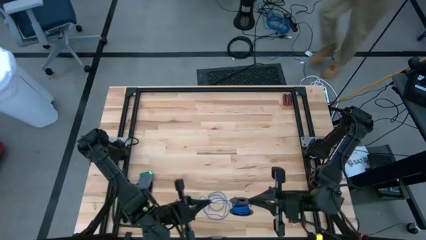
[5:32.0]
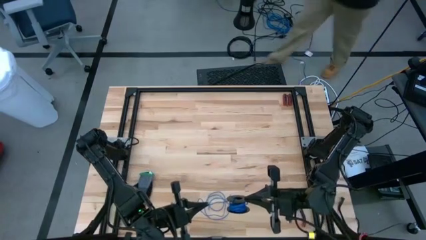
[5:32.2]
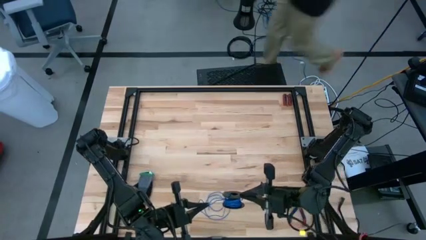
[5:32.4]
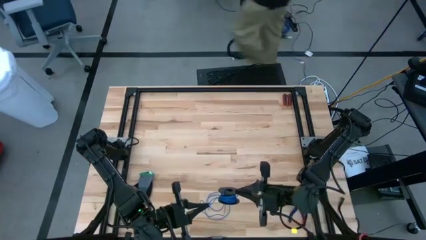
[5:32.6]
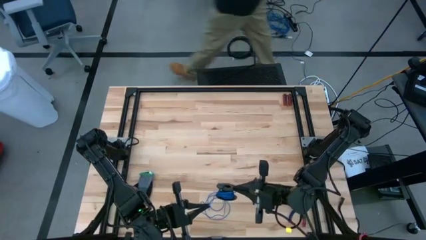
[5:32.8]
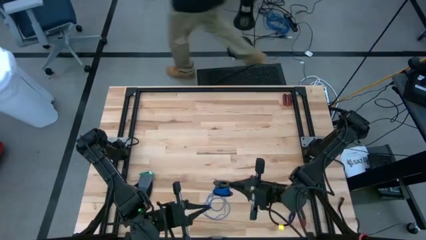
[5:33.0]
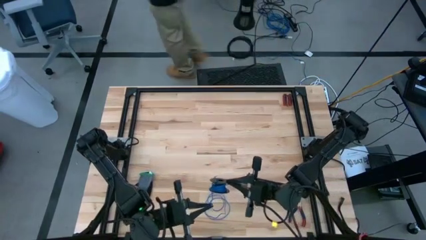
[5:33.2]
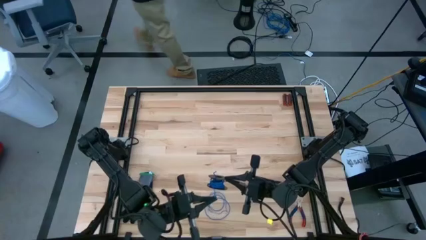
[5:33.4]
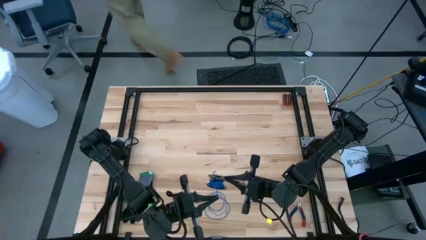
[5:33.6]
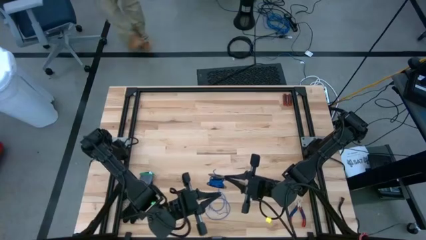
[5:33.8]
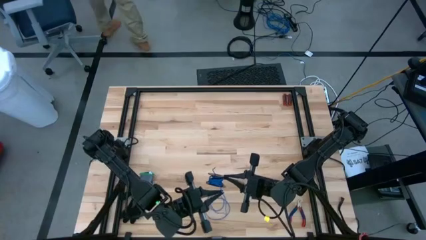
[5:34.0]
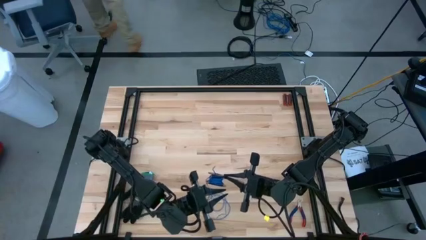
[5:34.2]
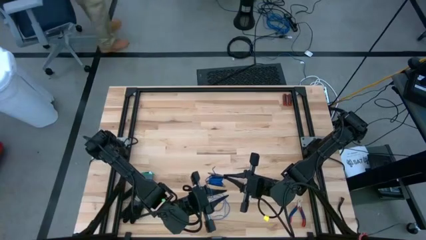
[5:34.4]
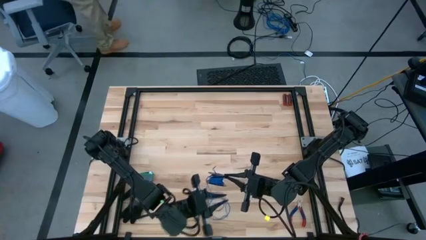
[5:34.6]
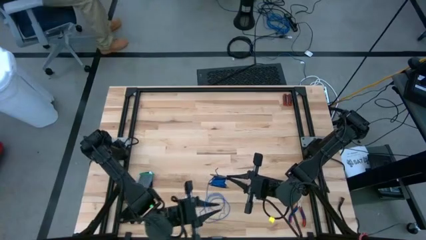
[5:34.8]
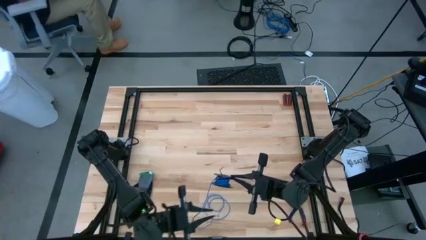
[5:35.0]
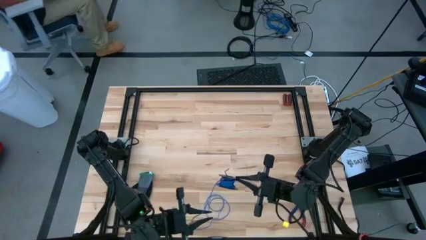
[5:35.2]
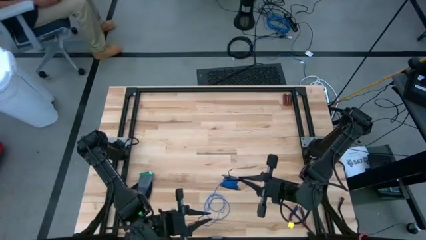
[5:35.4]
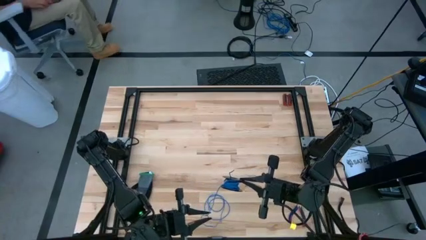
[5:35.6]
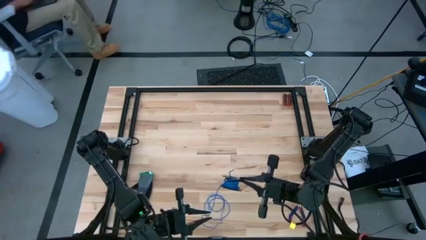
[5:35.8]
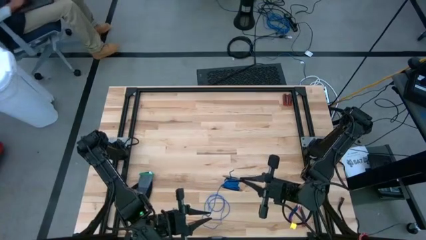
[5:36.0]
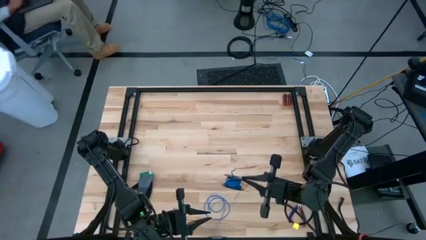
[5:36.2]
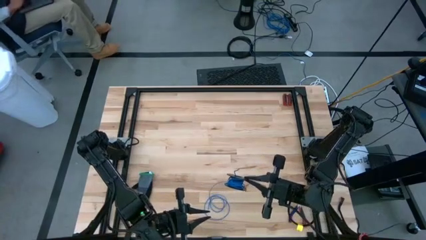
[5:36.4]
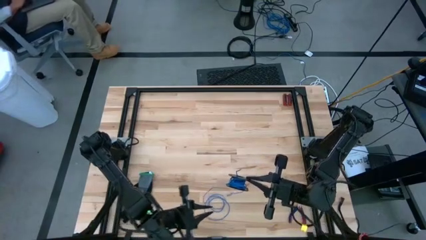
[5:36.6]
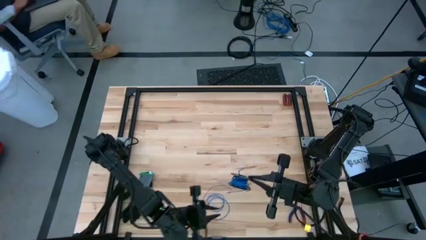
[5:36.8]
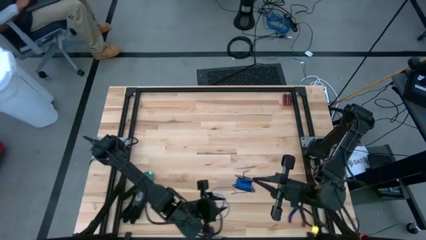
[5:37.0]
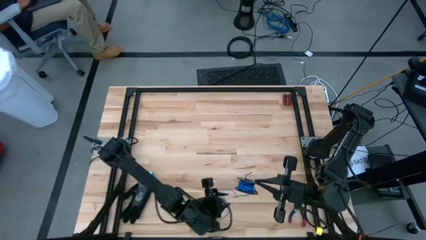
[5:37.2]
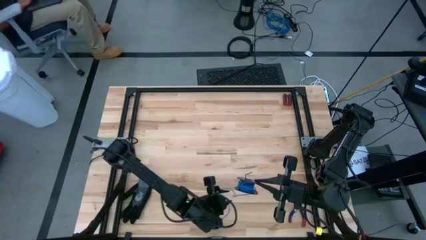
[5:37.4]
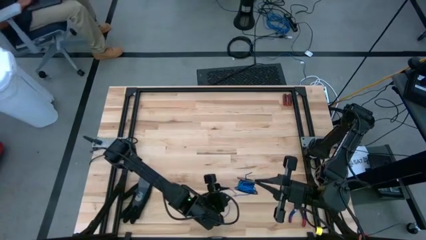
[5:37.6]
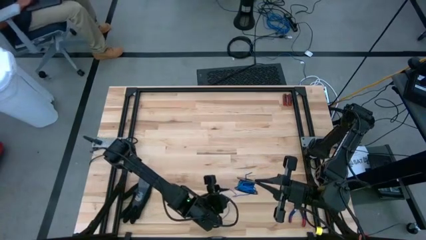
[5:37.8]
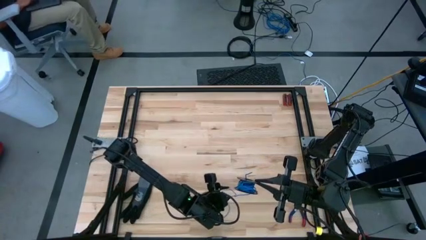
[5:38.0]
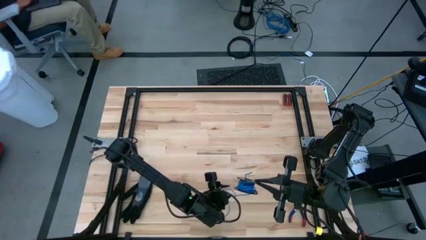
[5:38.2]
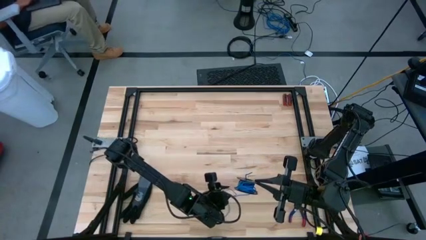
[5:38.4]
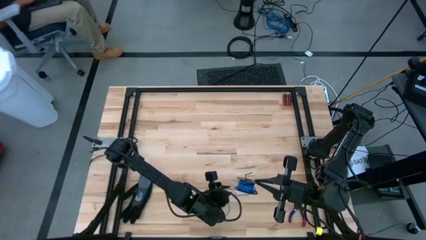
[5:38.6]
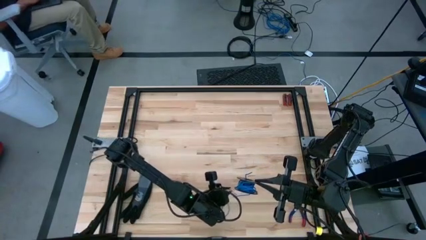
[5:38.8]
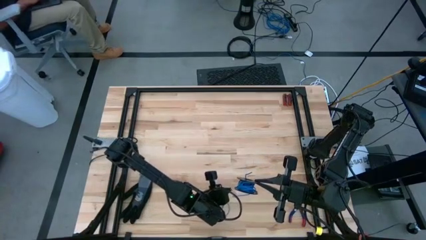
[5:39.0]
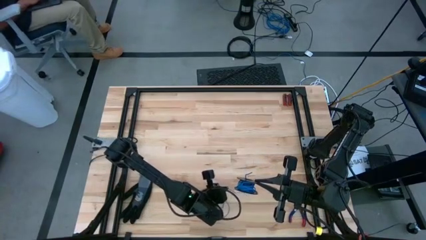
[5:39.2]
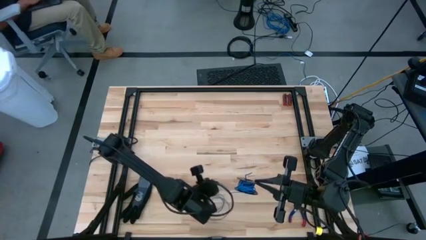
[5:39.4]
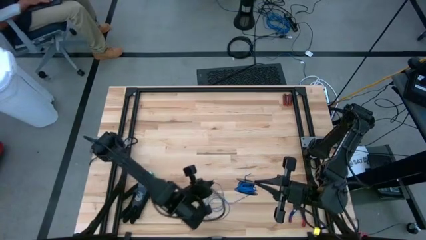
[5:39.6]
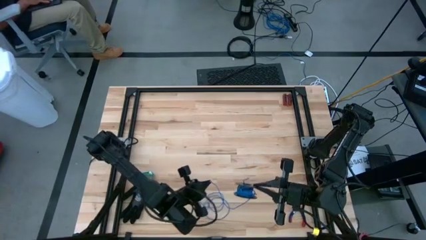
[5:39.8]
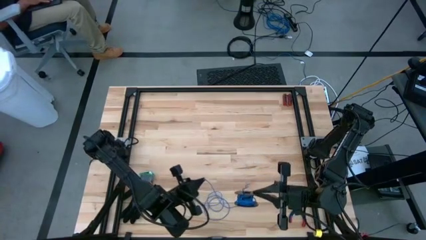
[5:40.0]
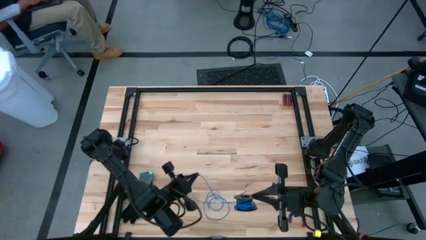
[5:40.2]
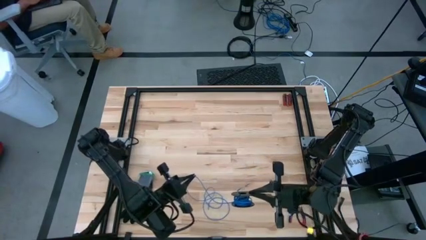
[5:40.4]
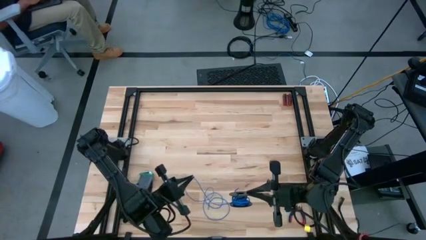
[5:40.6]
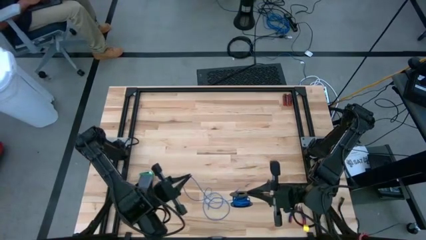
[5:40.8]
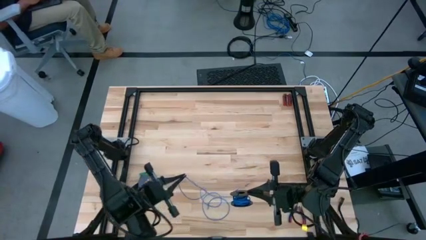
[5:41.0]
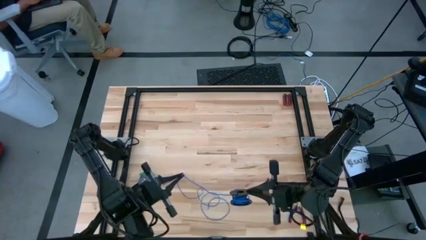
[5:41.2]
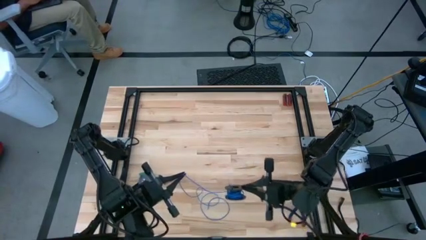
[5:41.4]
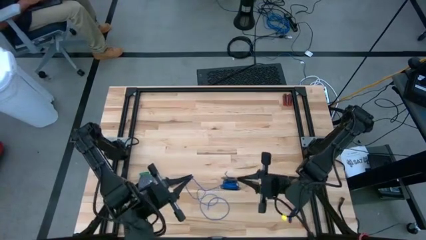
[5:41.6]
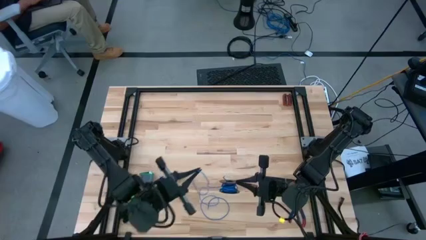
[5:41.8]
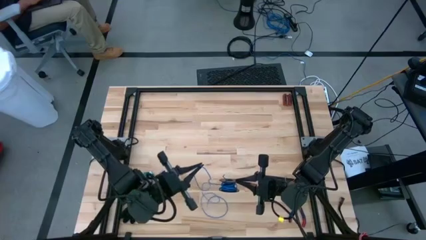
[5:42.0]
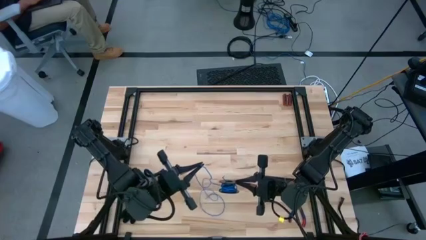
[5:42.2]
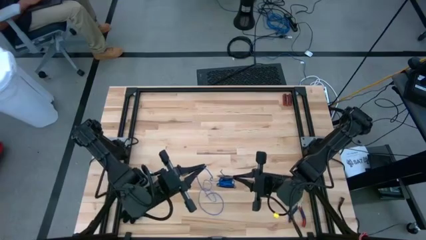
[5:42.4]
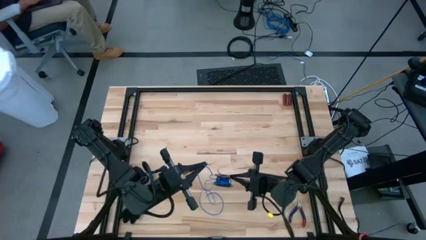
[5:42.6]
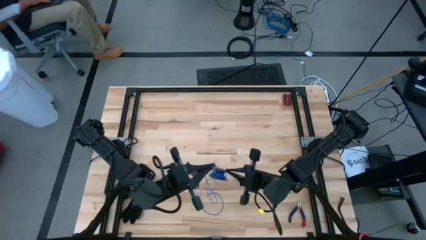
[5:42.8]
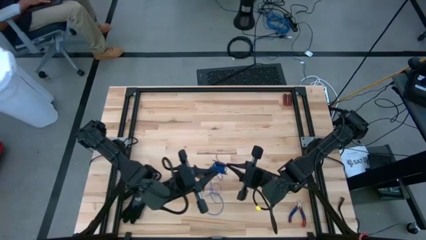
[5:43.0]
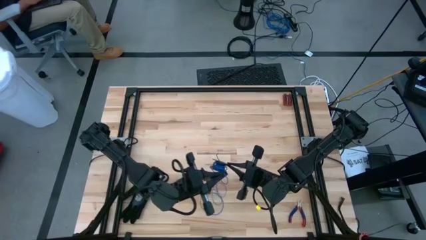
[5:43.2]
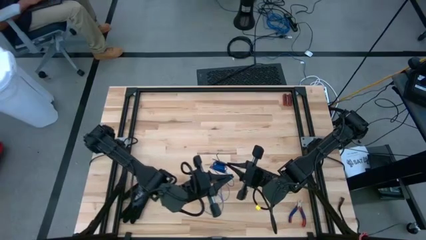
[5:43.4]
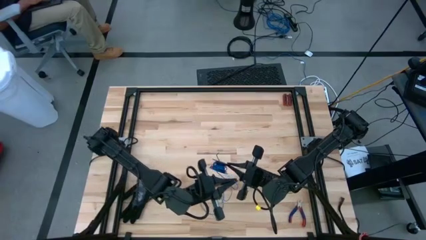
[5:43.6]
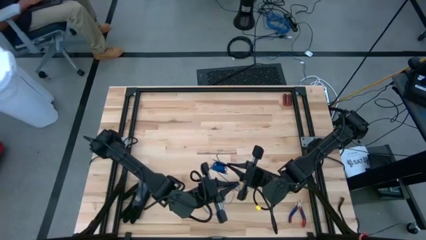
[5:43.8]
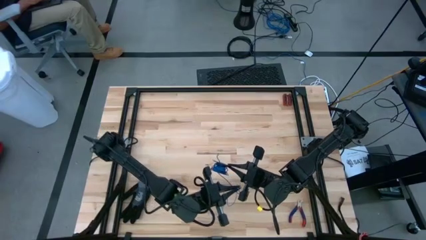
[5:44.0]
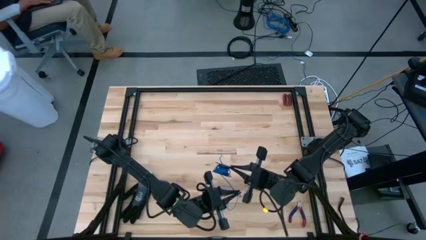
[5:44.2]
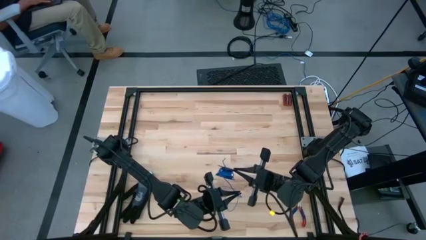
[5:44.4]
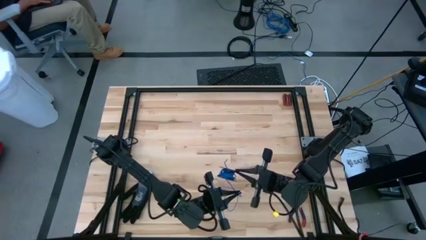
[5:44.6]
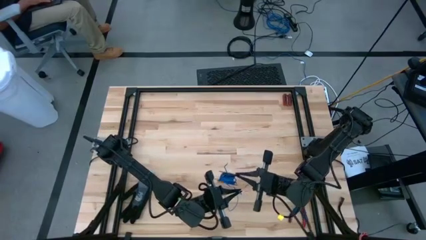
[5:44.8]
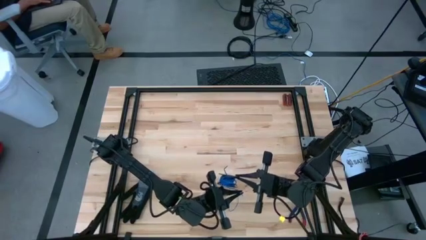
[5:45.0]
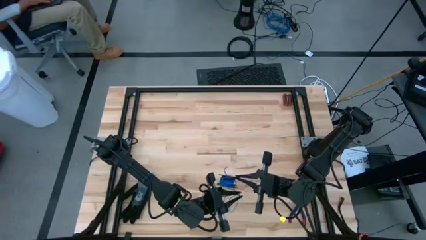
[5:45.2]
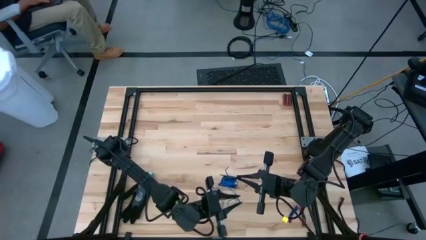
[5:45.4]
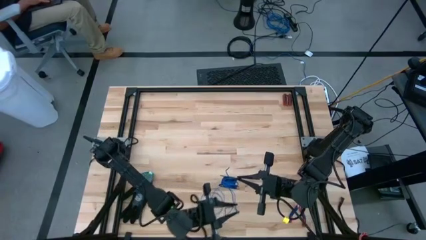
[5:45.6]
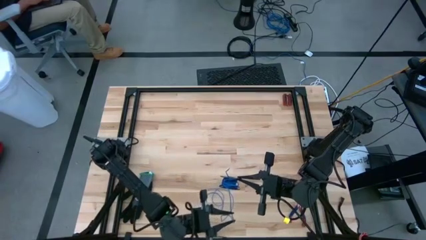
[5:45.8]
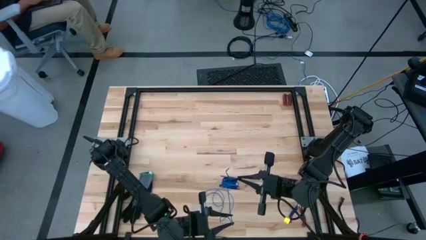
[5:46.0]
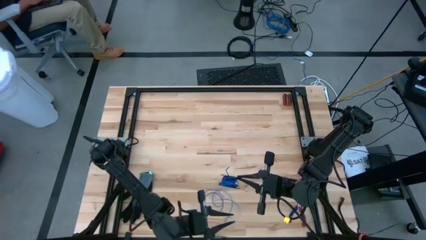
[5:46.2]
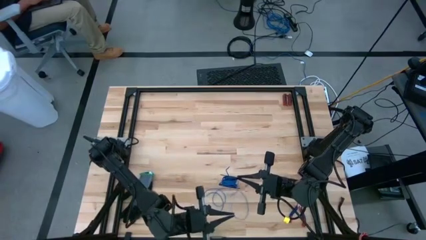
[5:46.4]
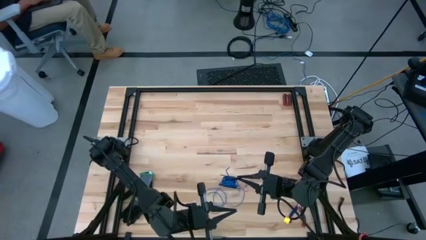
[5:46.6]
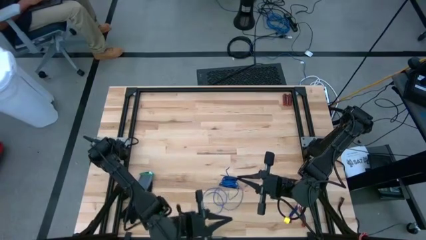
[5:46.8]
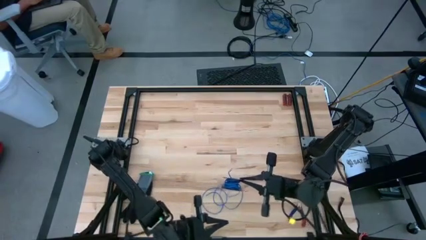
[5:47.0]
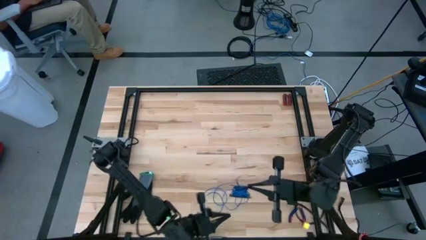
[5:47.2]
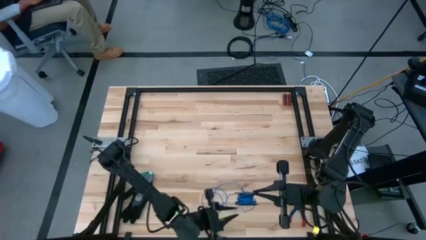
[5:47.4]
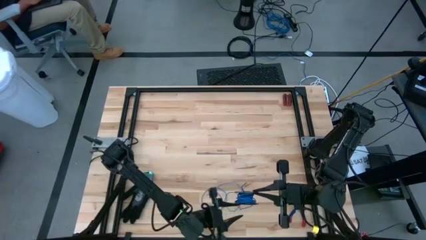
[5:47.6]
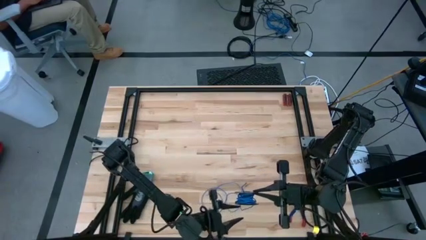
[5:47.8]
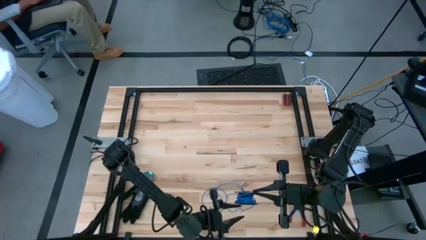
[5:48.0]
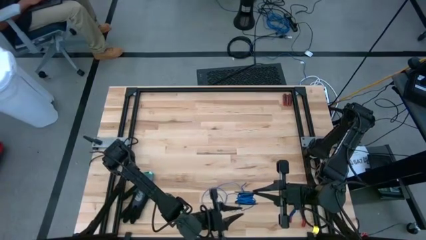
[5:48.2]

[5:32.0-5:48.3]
Task: Coil cords
Coil the blue wire onto the spool

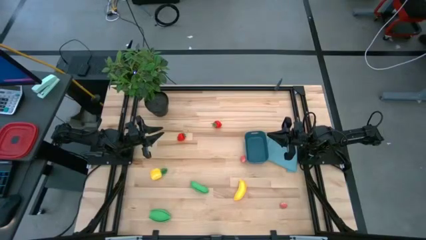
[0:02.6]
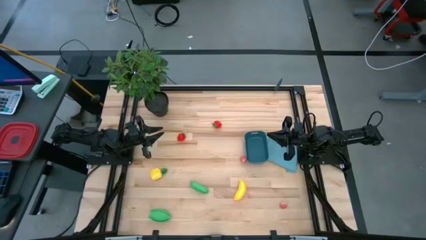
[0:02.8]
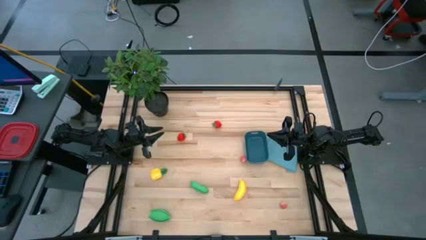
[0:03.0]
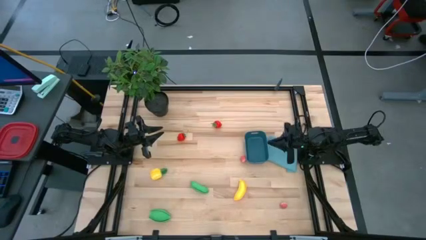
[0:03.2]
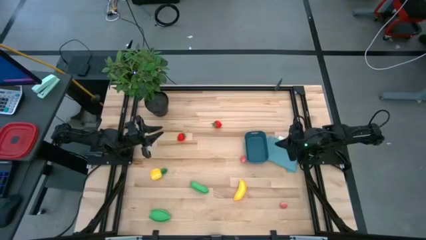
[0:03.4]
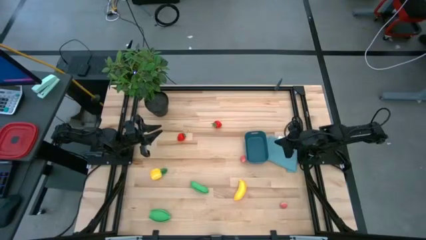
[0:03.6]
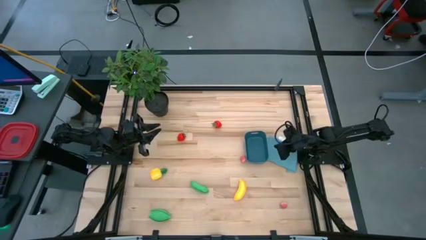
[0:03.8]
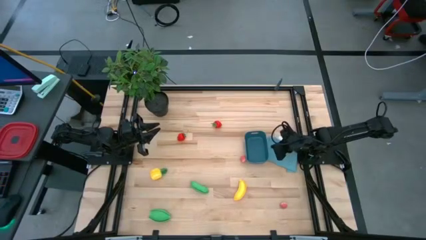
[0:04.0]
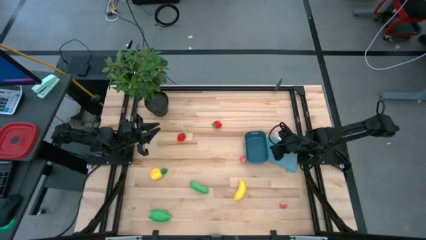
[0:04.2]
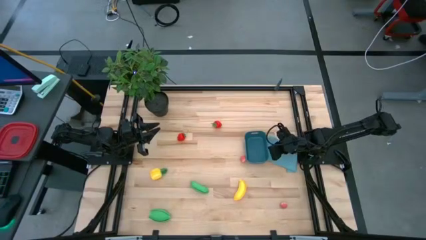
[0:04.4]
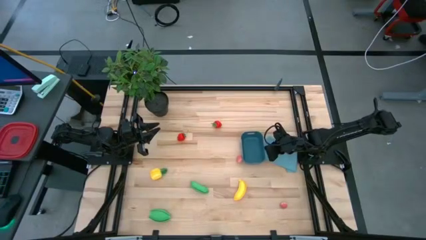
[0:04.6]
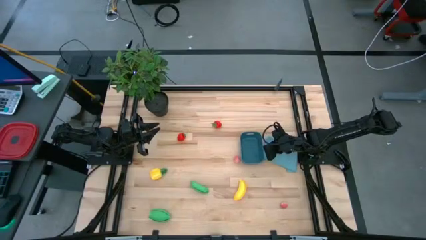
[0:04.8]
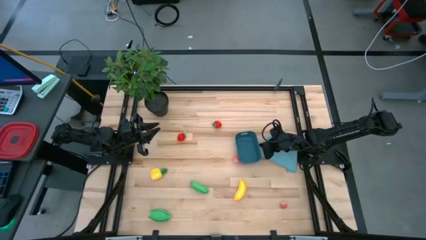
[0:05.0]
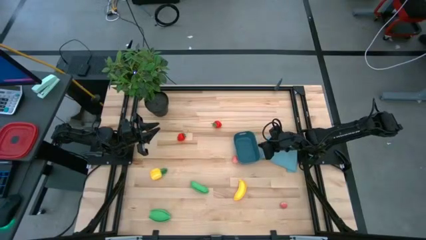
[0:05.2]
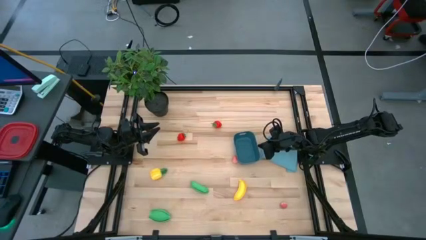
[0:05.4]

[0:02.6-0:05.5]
Task: Pick and placing Produce into tupperware
Adjust the blue bin on the table
